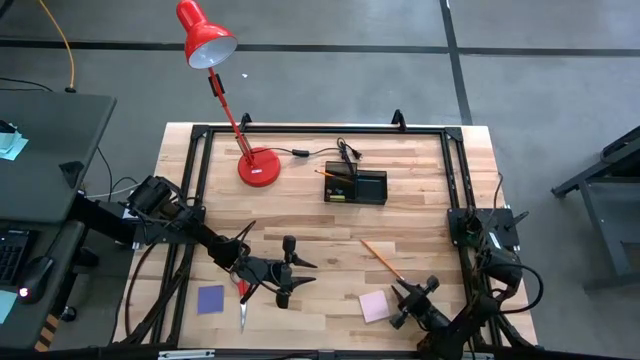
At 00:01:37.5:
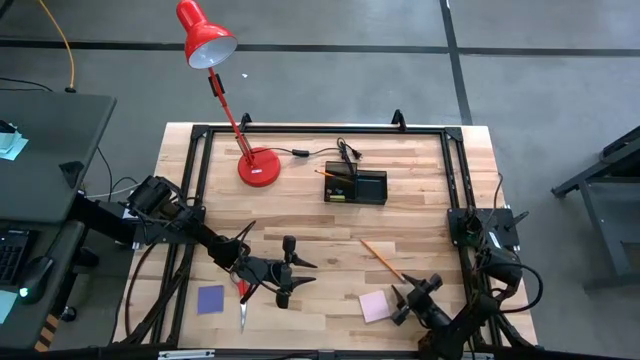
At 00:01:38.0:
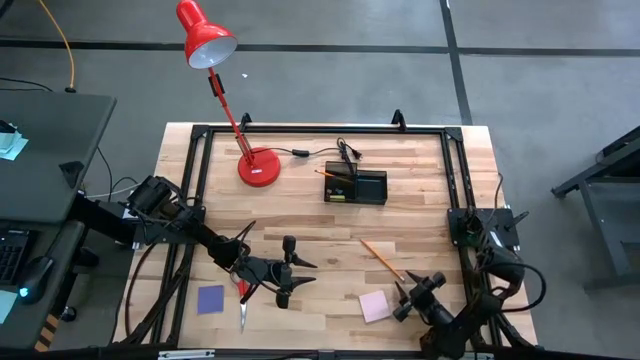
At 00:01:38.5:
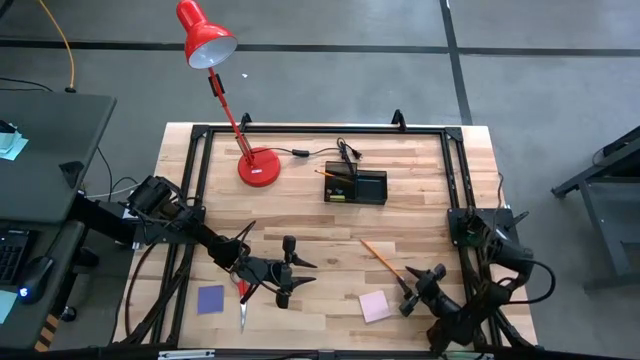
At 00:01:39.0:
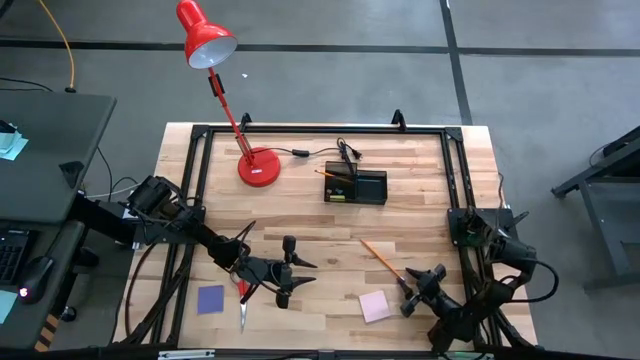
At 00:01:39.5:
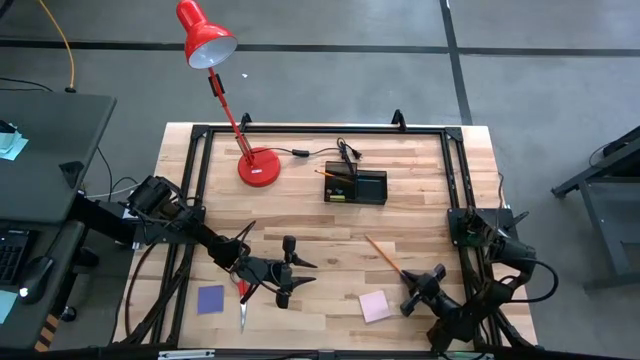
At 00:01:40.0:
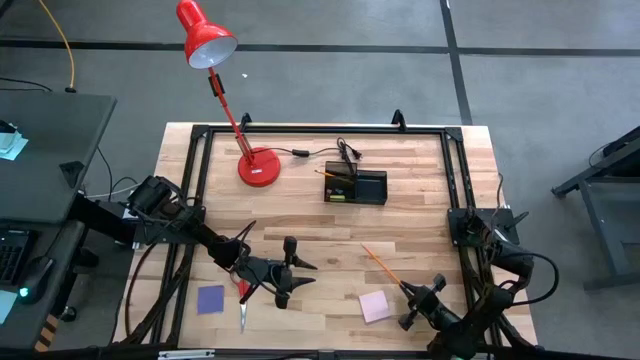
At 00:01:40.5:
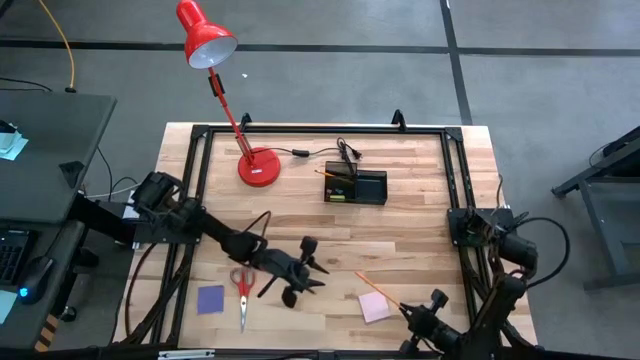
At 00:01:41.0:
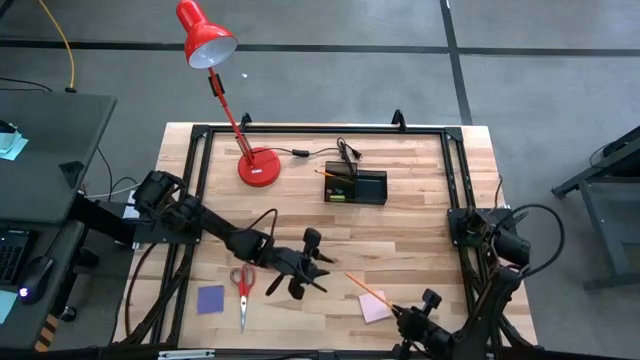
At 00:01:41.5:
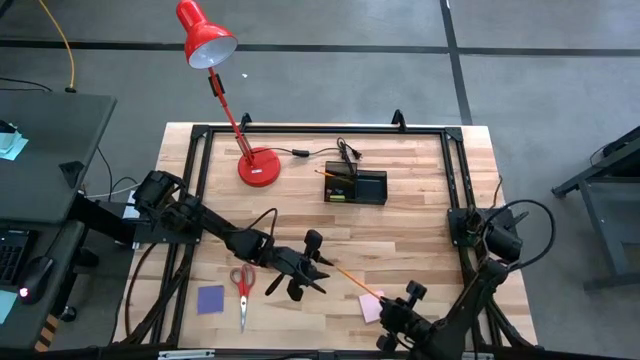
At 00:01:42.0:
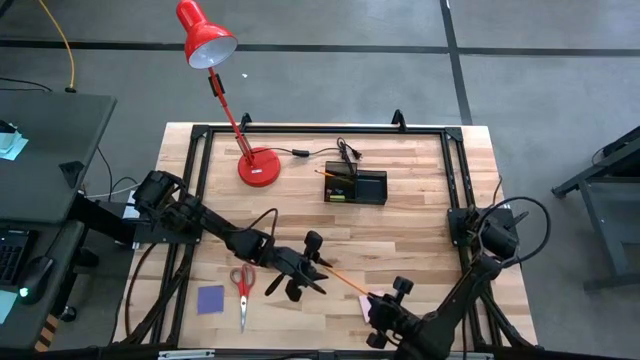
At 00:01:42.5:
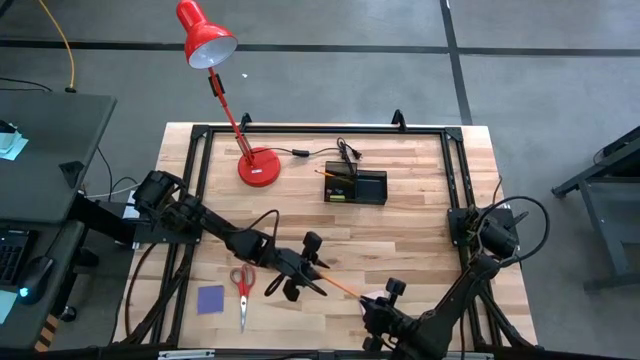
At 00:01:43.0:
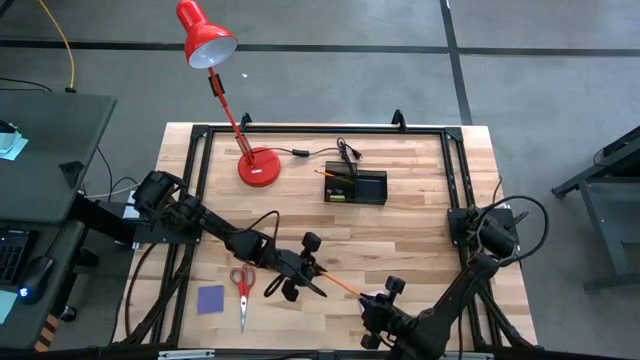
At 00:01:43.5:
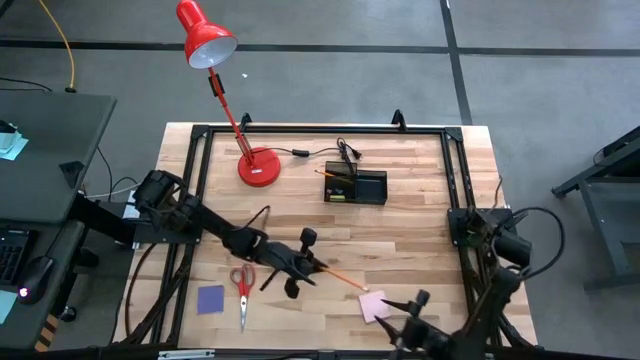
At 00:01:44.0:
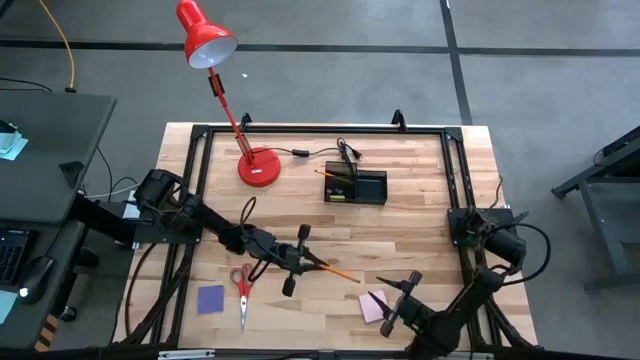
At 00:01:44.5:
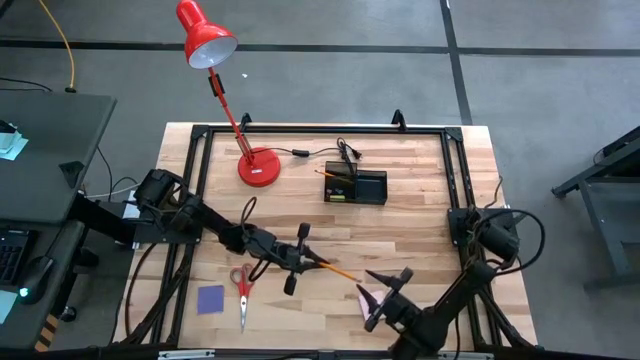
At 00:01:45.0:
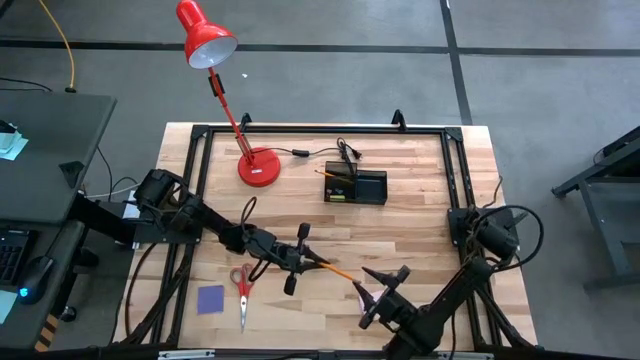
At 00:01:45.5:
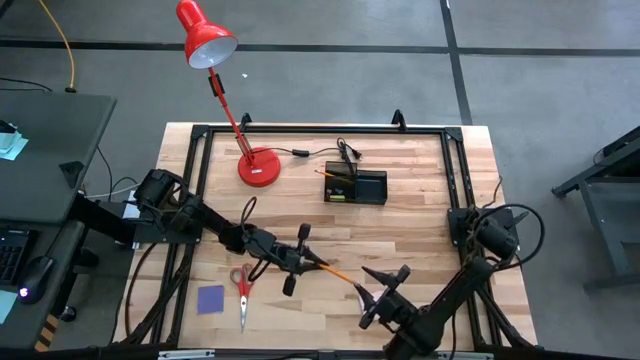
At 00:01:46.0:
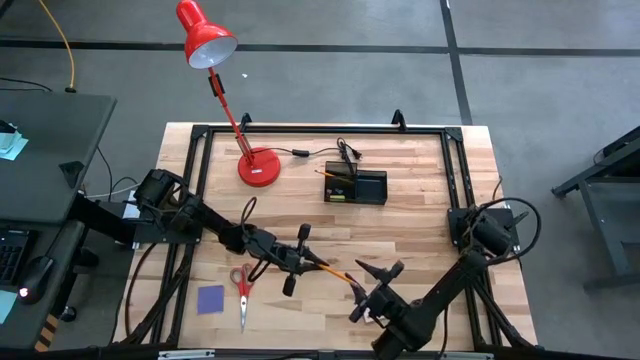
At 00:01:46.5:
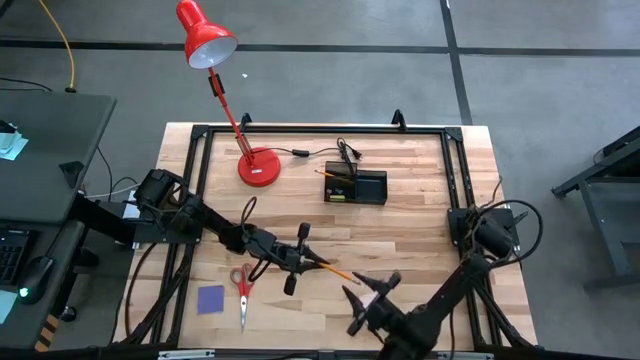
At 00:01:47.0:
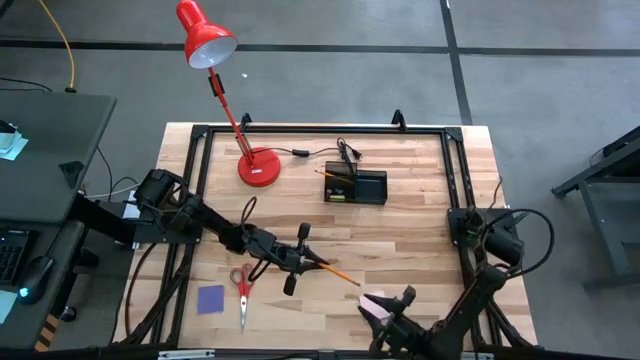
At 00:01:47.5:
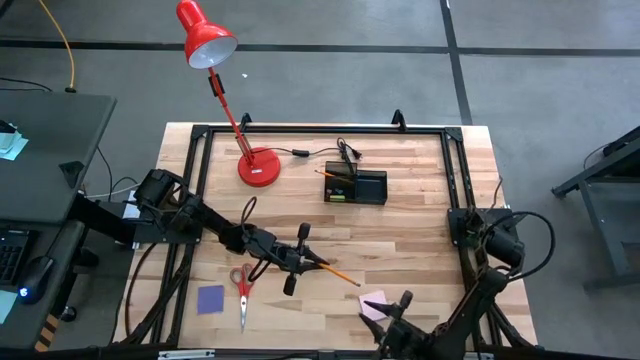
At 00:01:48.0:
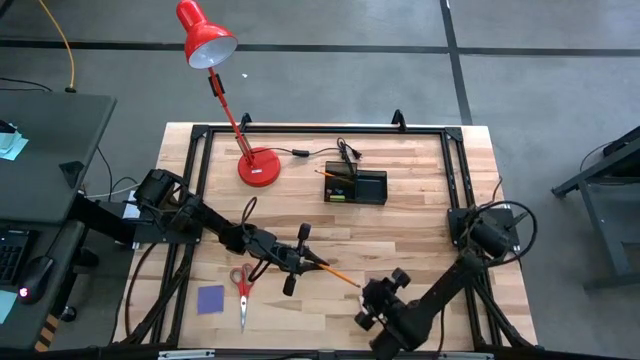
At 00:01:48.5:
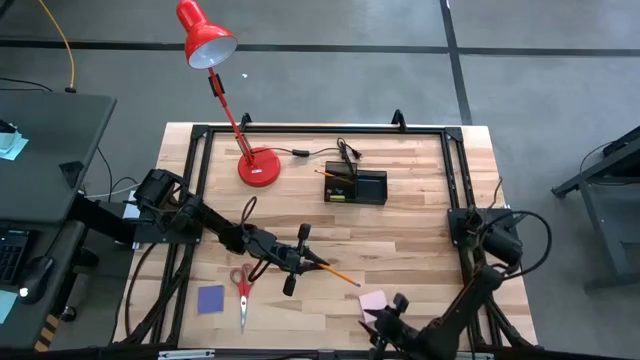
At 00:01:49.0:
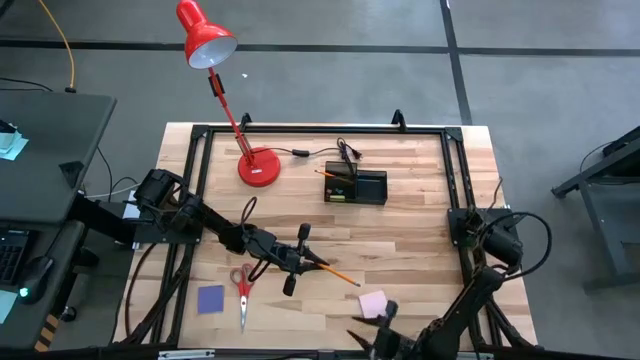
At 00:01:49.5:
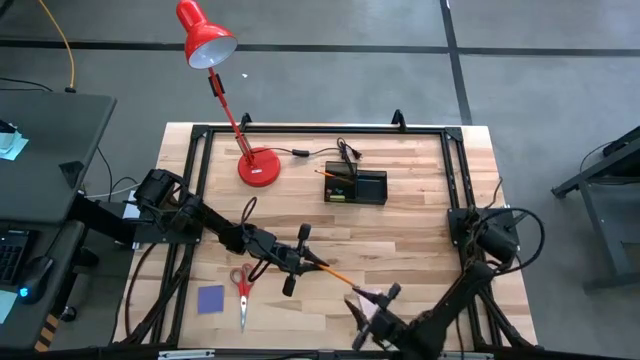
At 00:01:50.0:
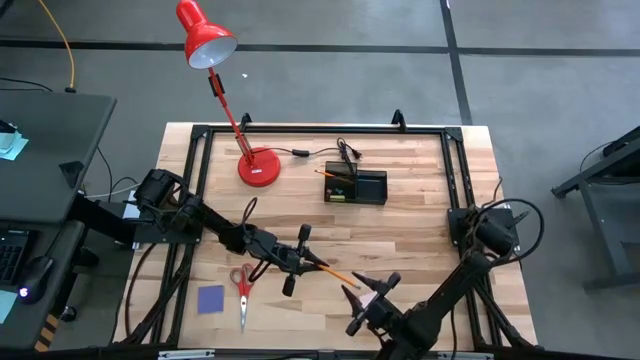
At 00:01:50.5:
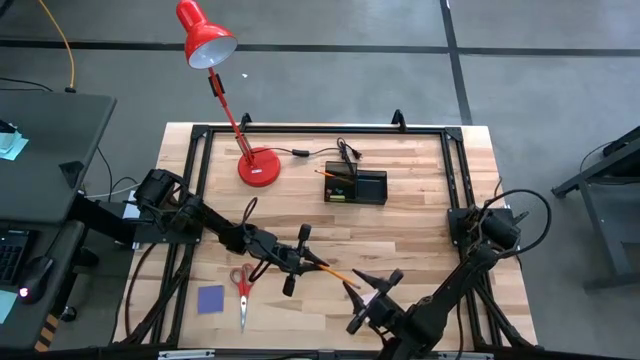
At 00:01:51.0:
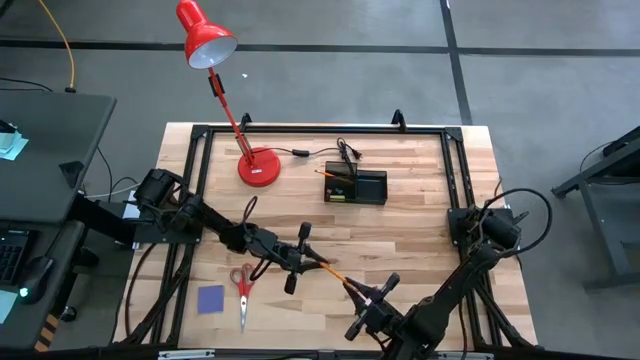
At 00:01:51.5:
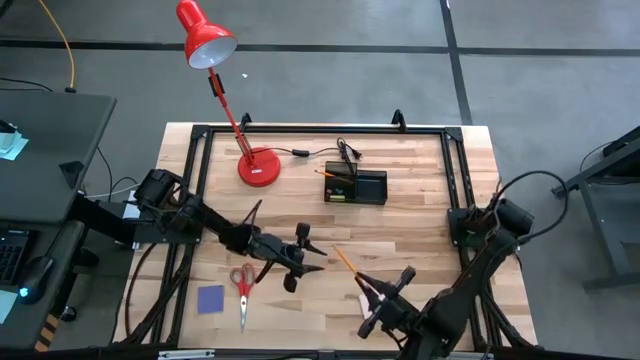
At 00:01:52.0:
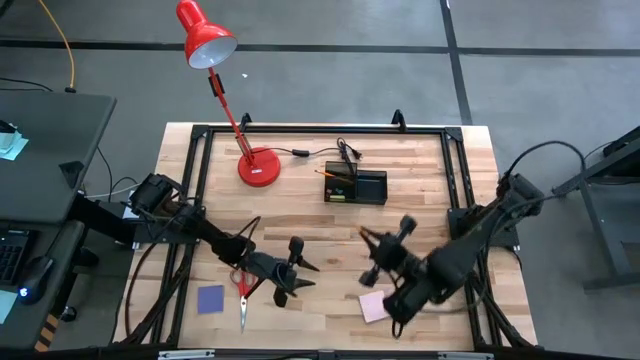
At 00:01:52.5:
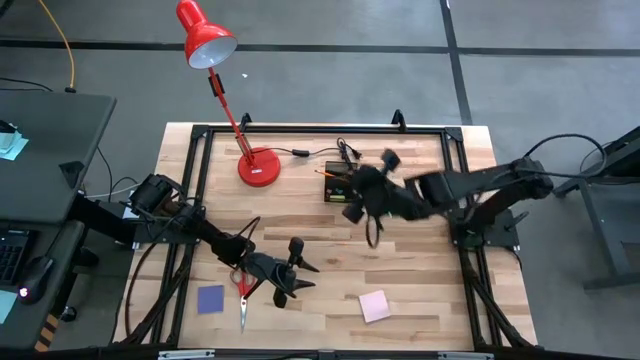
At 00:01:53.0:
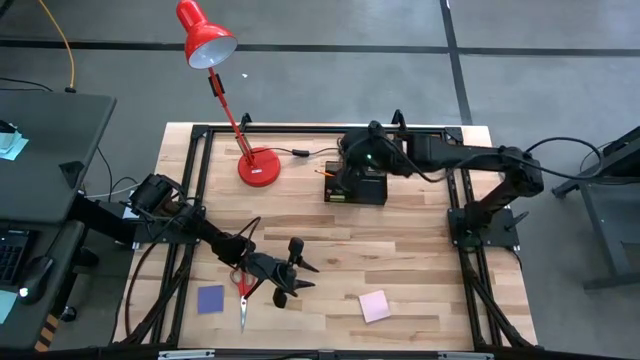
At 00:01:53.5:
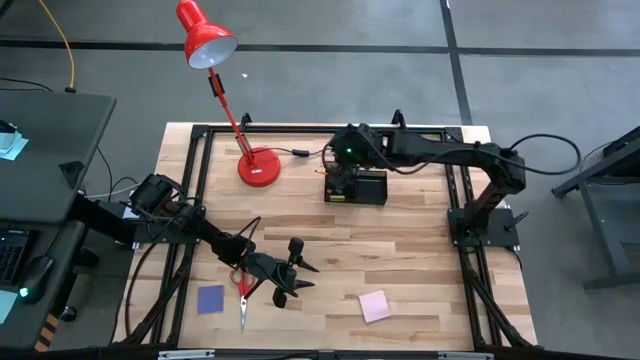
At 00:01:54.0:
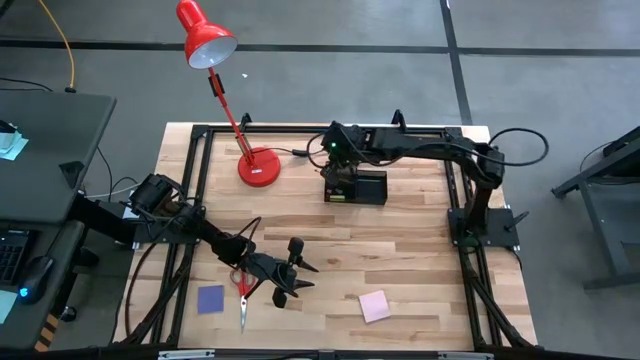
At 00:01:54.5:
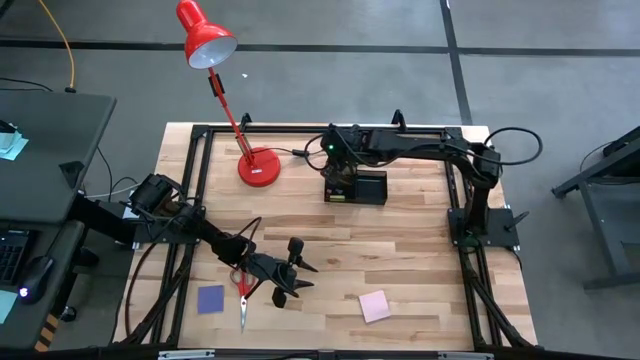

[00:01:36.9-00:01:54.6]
Task: Pick and place office supplies into organizer
Put the orange pencil into the desk organizer

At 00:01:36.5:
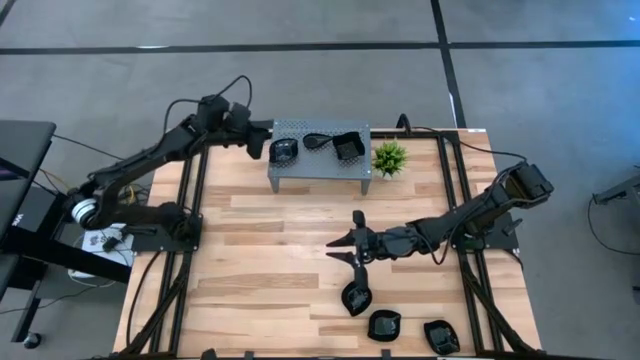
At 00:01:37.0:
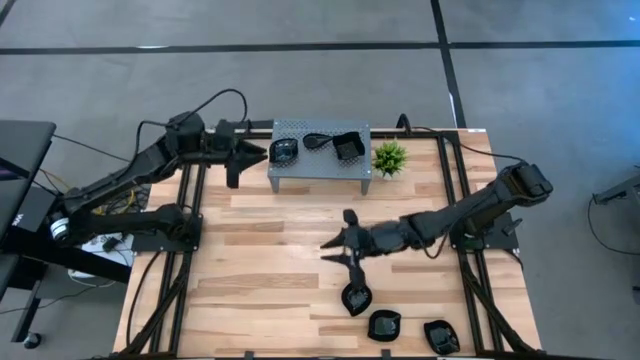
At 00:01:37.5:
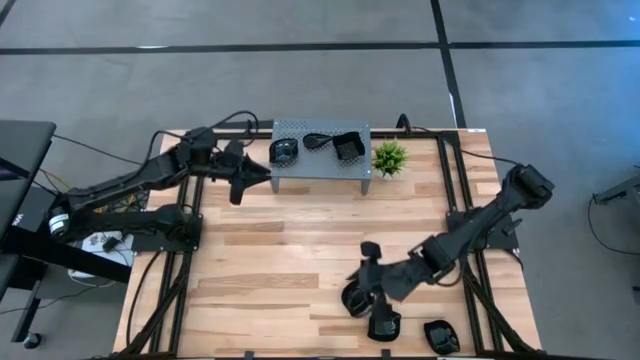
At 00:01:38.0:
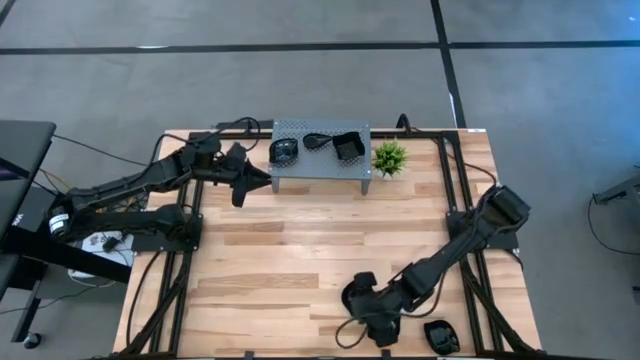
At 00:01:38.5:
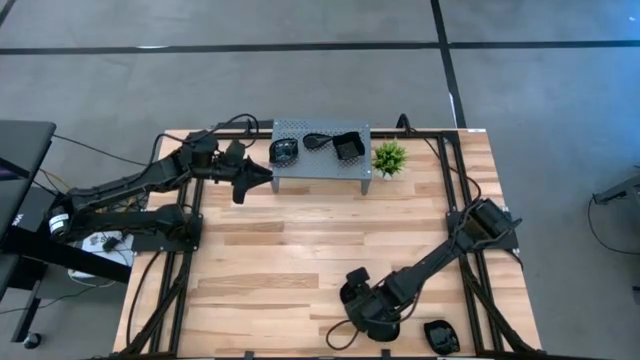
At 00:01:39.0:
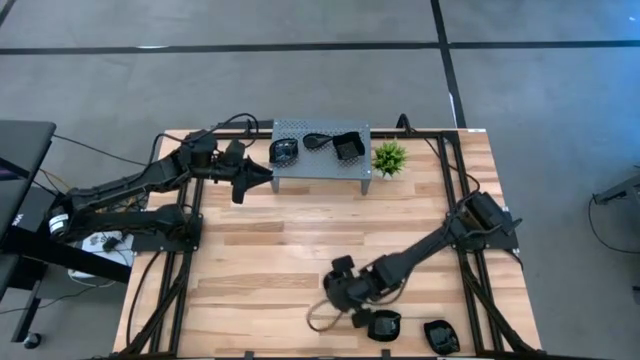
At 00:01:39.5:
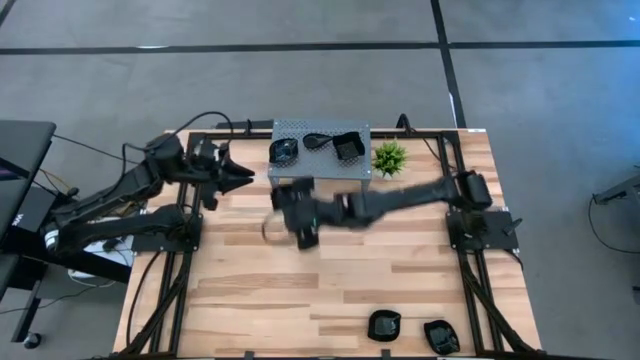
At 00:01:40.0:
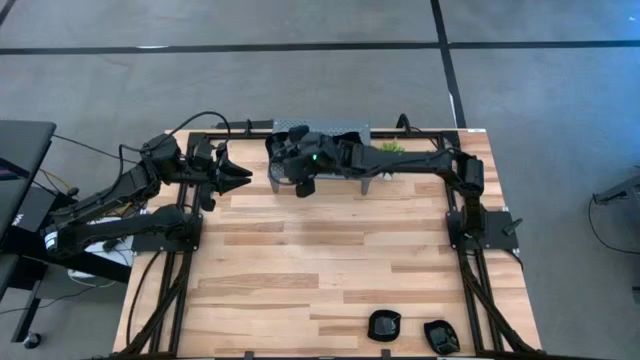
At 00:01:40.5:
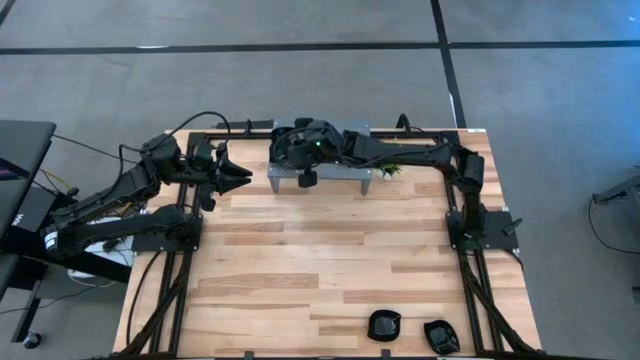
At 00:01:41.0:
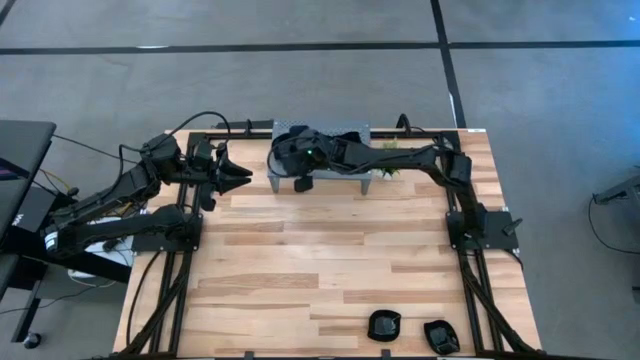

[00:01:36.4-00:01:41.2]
Task: Pick & Place Mini shaped plates
Stack the leaf-shaped plate on top of the leaf-shaped plate on the shelf
